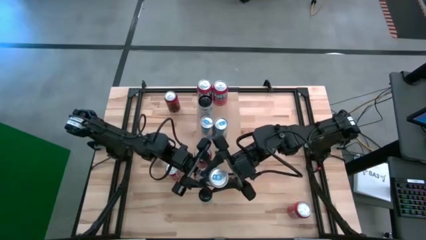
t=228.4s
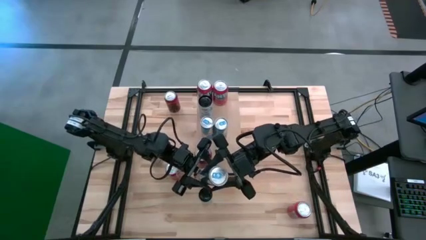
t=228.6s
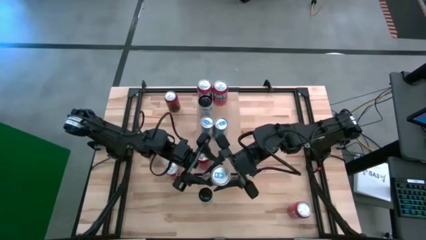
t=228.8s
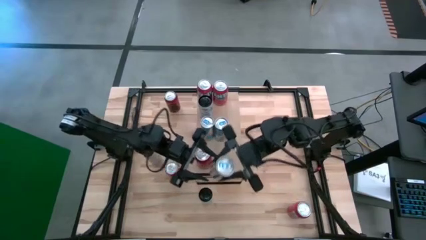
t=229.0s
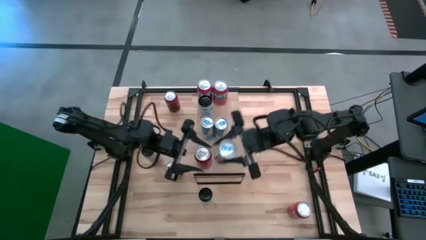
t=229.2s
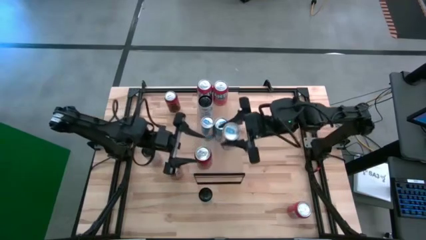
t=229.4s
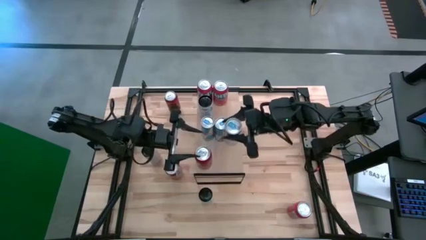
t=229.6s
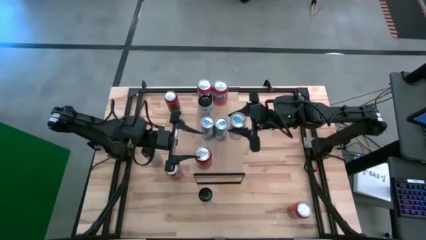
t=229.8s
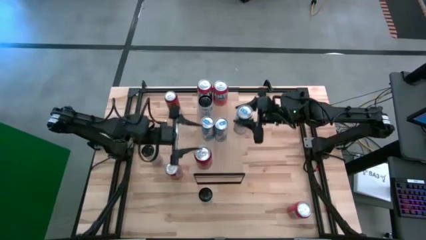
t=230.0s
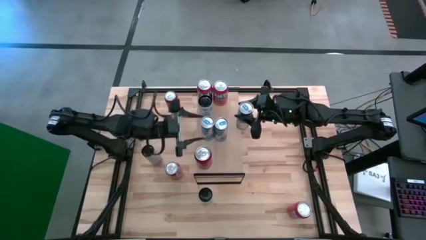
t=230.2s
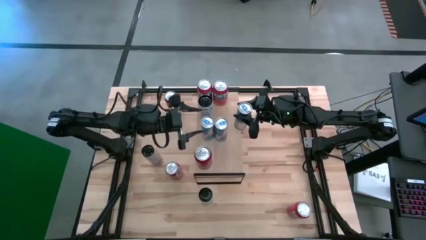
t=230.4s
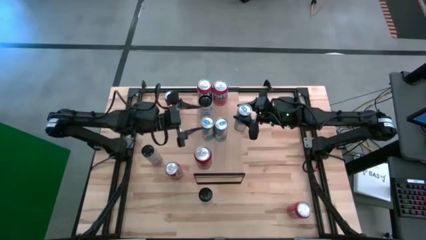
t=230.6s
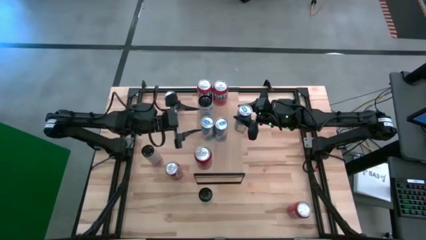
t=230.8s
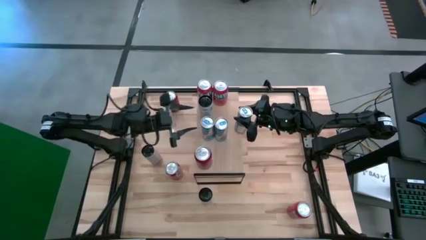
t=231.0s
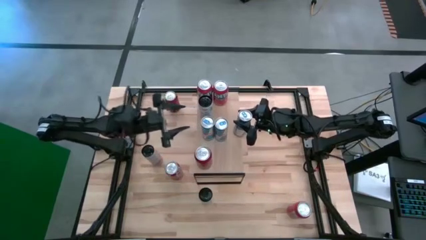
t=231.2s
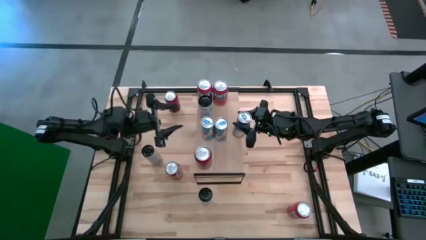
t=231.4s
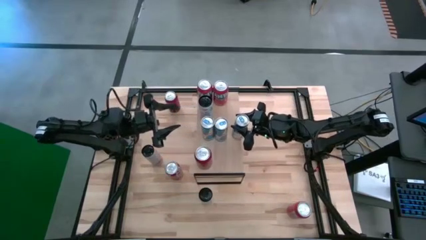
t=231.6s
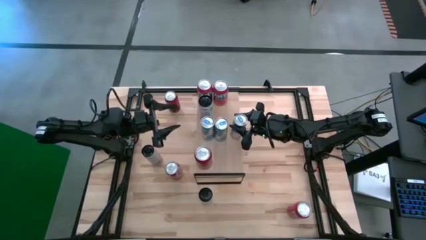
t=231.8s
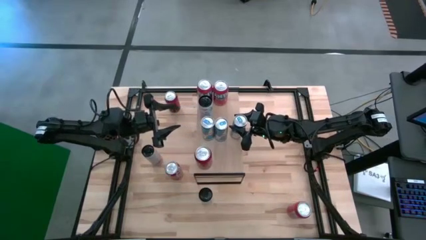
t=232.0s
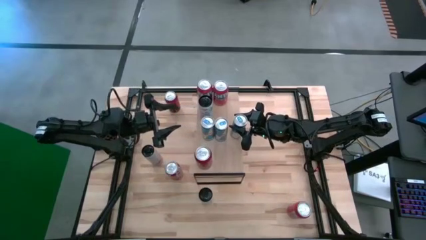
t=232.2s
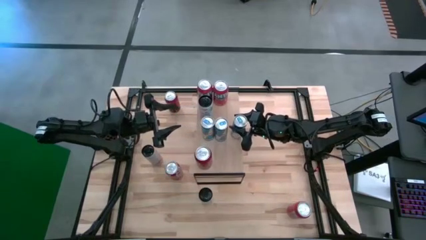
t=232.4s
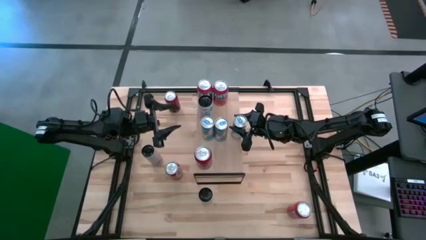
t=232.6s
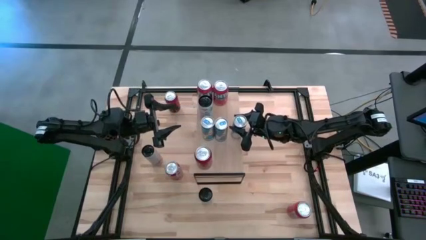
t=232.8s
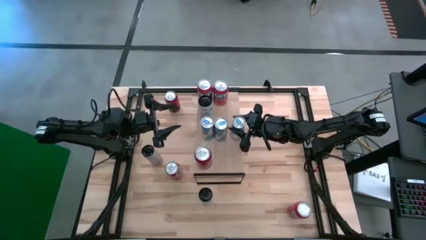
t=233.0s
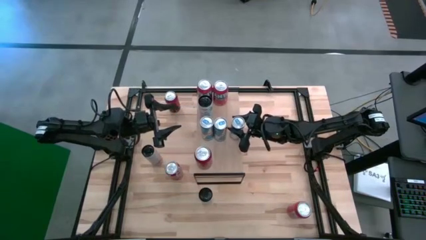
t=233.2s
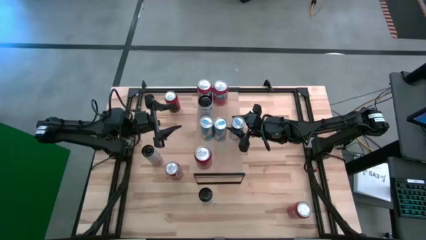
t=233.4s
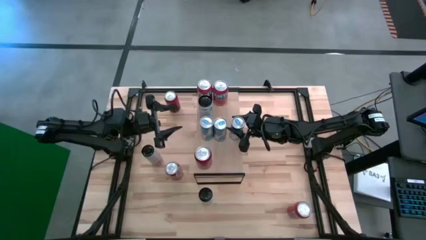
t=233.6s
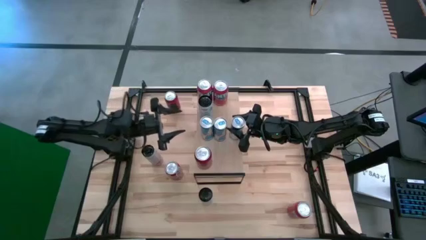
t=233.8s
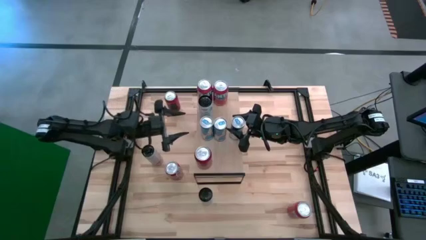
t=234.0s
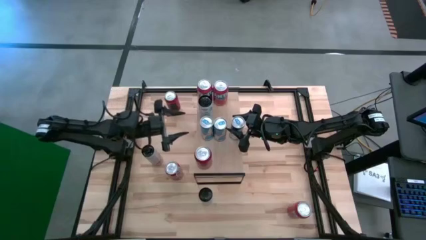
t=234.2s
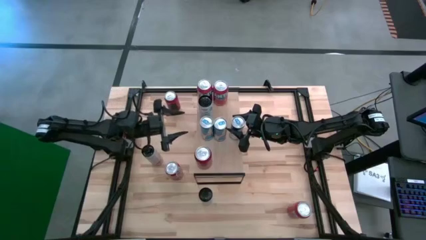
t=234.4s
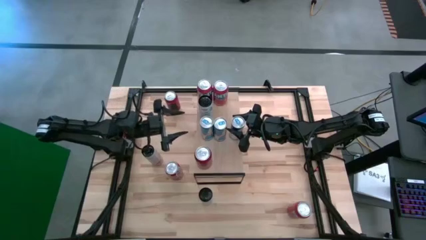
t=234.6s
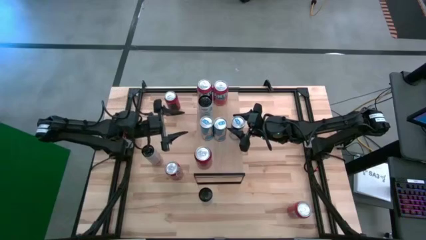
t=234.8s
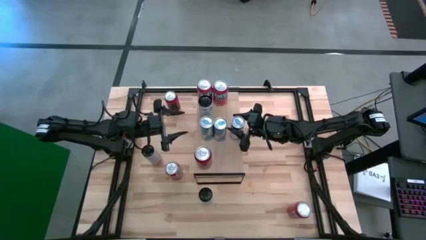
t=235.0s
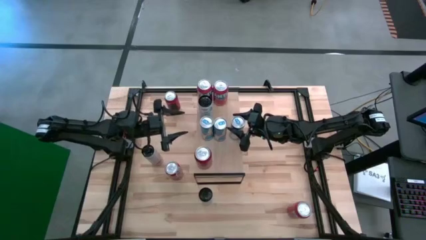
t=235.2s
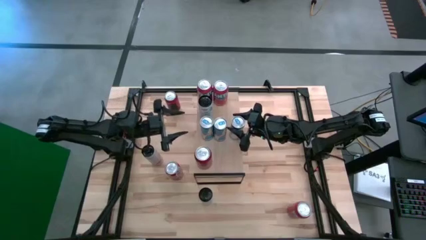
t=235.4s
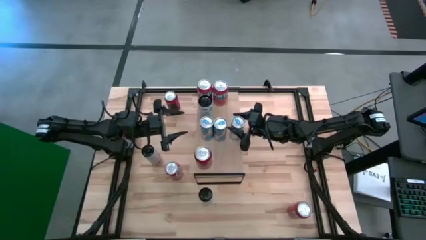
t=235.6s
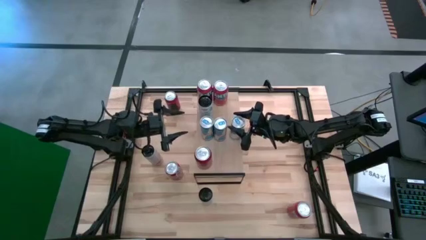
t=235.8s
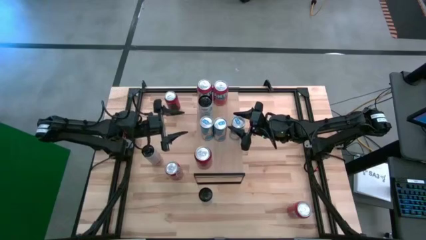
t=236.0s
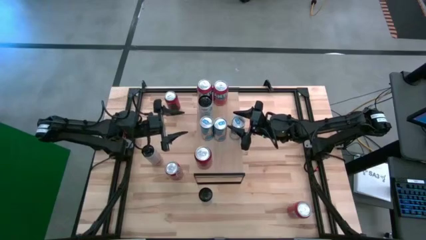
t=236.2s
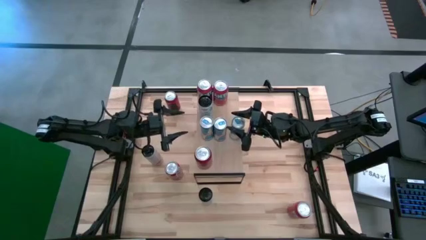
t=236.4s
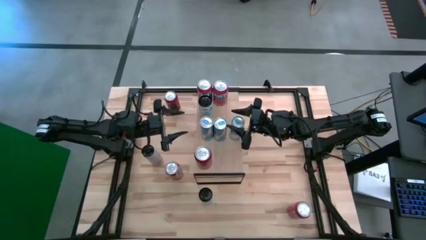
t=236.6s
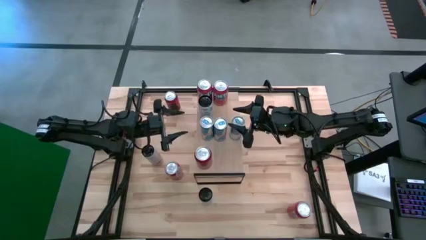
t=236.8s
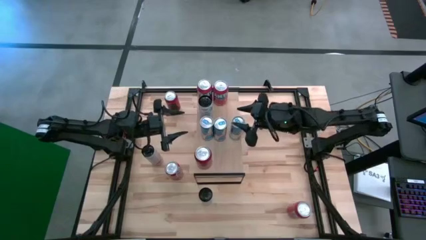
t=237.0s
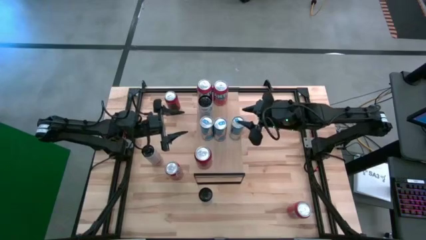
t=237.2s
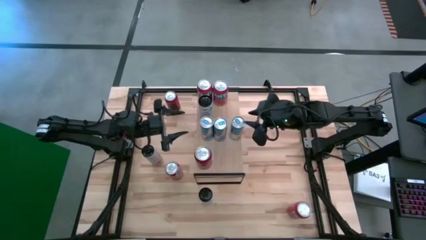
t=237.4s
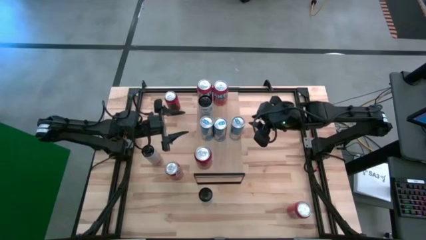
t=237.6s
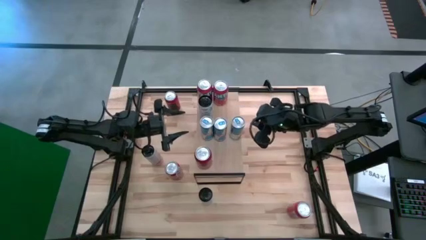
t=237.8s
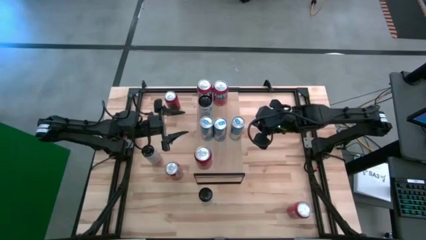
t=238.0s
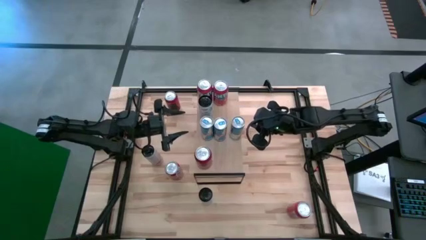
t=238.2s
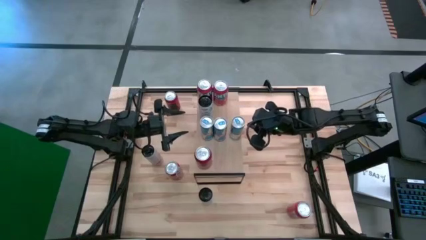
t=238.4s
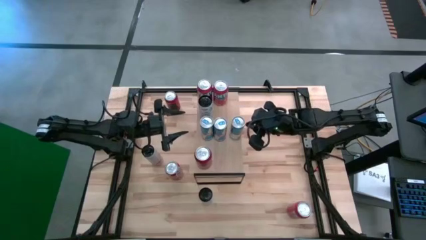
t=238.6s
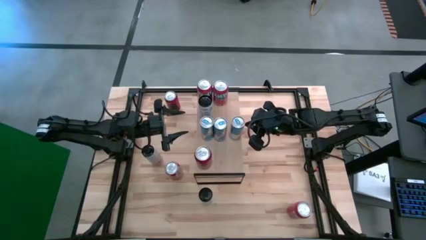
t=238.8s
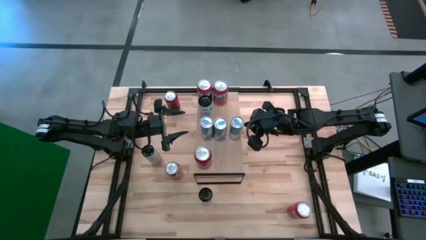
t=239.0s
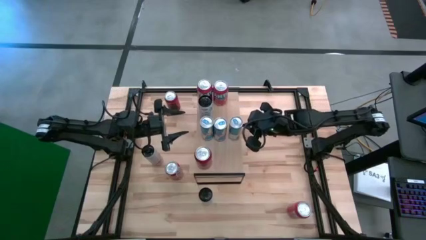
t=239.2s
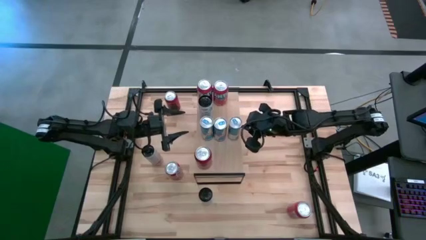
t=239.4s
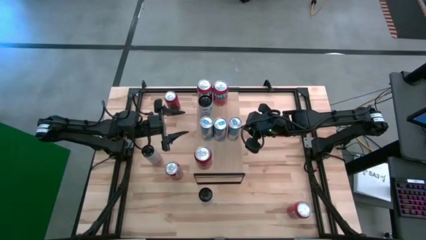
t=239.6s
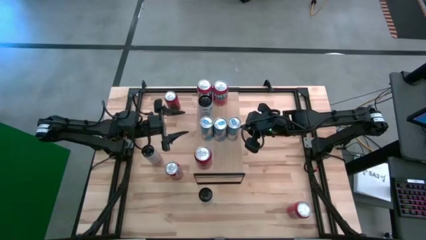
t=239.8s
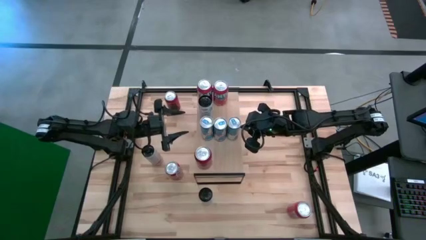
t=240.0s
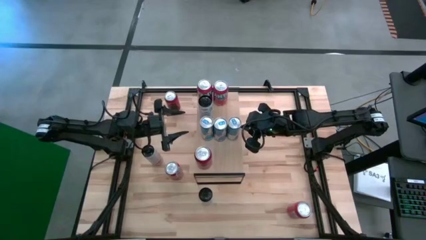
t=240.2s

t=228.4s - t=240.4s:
Task: Place canned beverage on shelf
Put the blue soda can on the shelf aligned with the other blue soda cans
